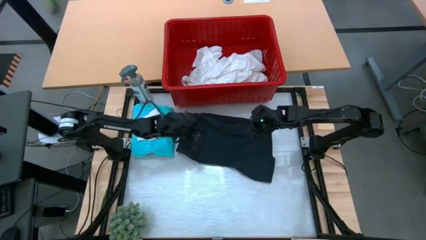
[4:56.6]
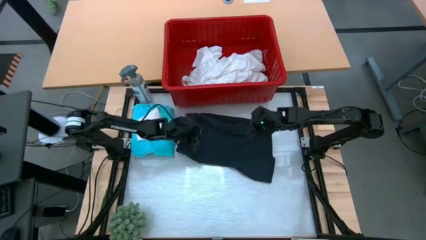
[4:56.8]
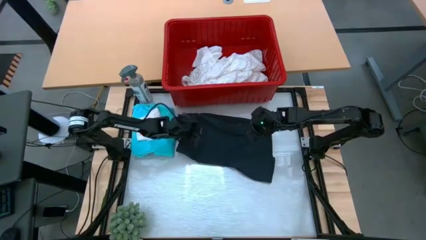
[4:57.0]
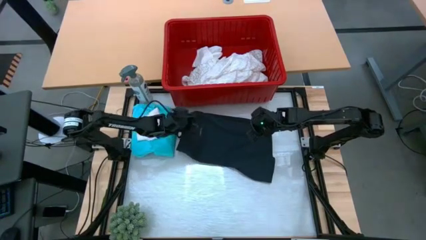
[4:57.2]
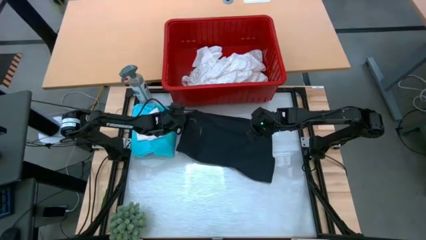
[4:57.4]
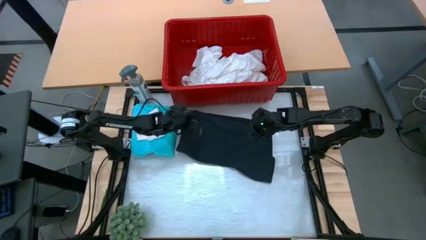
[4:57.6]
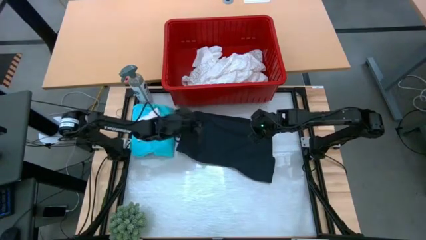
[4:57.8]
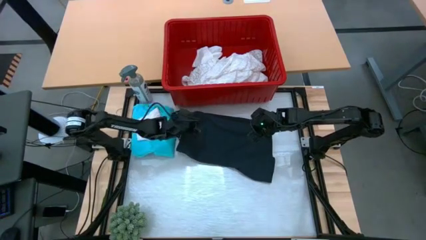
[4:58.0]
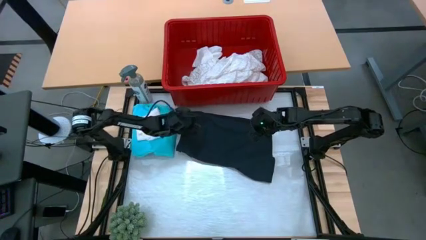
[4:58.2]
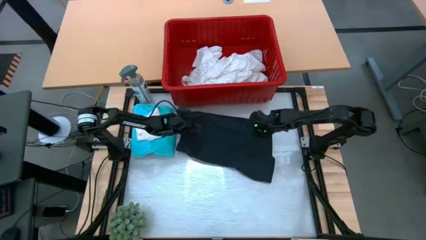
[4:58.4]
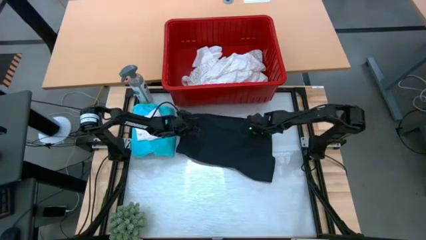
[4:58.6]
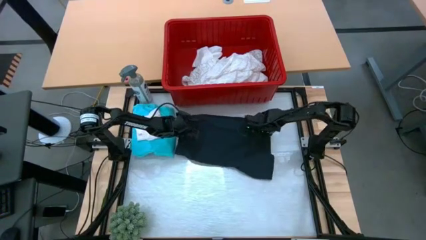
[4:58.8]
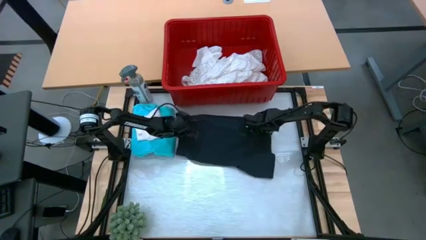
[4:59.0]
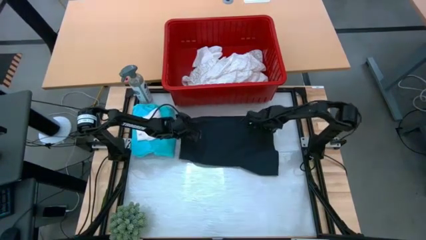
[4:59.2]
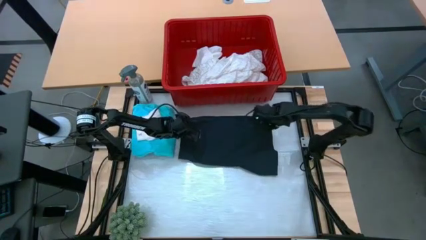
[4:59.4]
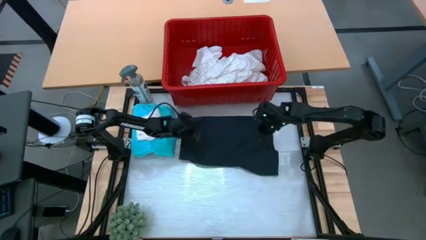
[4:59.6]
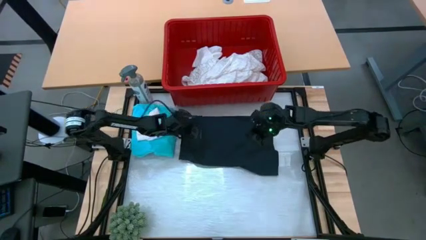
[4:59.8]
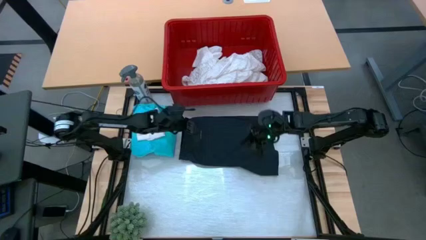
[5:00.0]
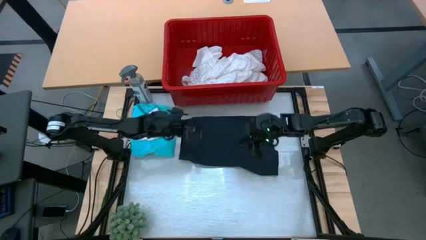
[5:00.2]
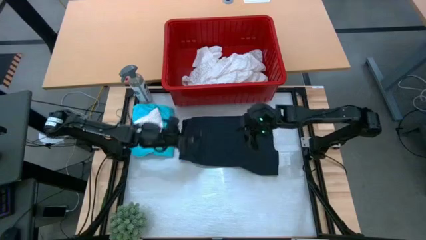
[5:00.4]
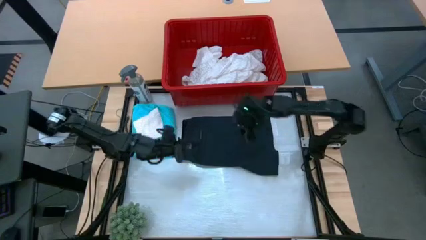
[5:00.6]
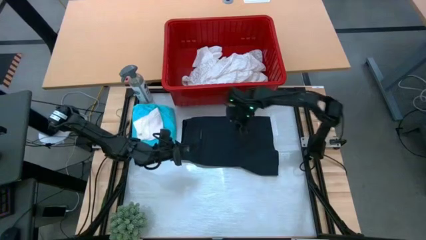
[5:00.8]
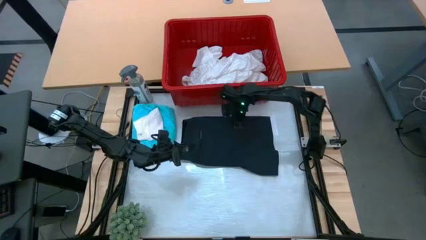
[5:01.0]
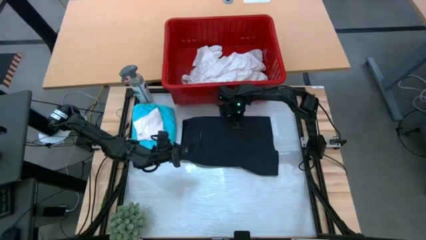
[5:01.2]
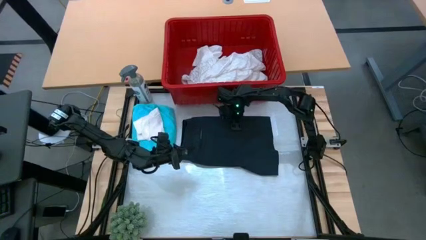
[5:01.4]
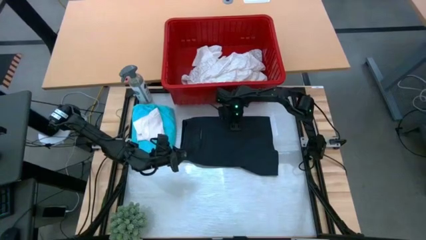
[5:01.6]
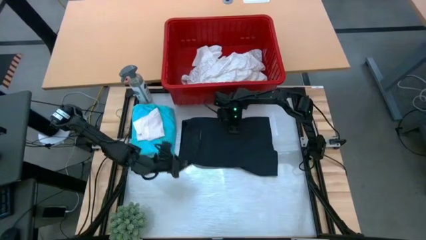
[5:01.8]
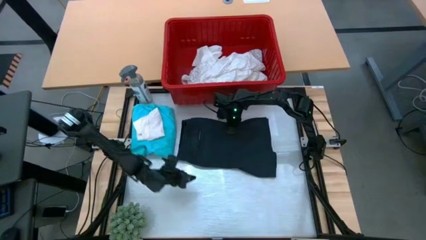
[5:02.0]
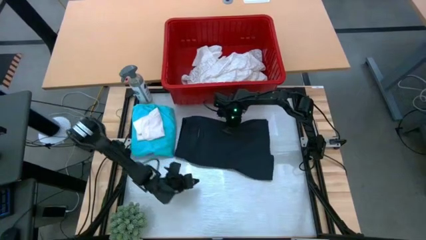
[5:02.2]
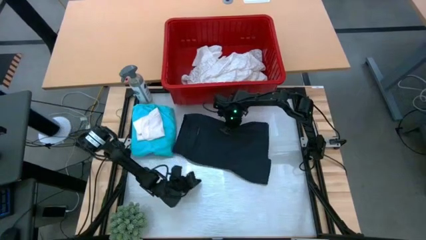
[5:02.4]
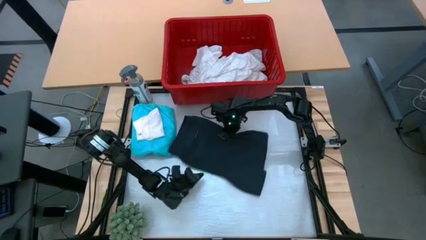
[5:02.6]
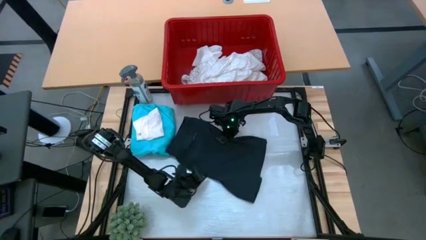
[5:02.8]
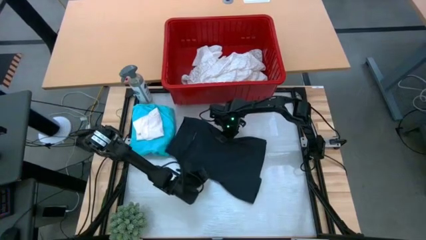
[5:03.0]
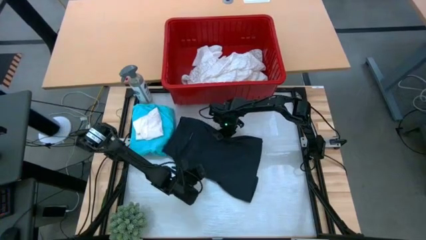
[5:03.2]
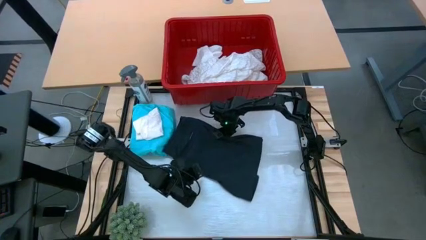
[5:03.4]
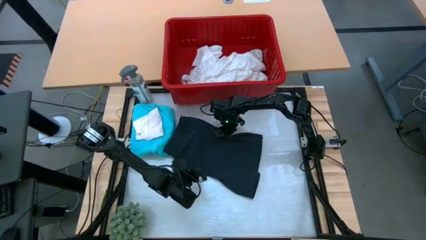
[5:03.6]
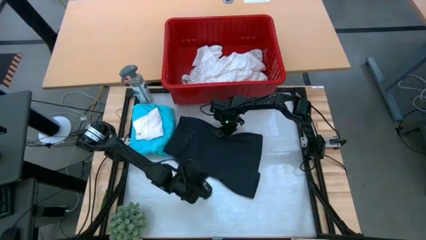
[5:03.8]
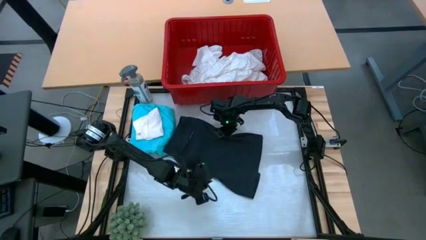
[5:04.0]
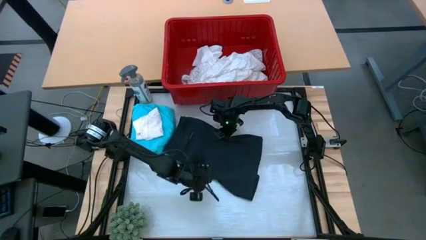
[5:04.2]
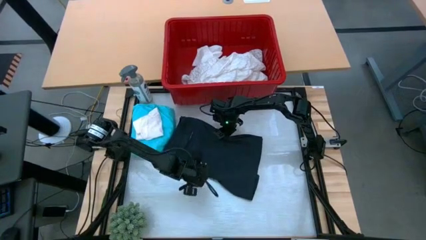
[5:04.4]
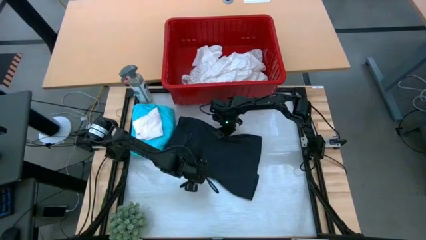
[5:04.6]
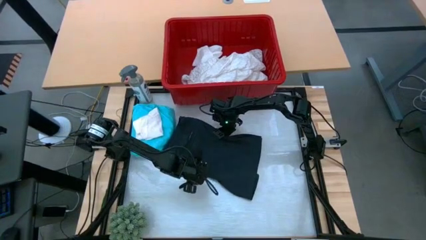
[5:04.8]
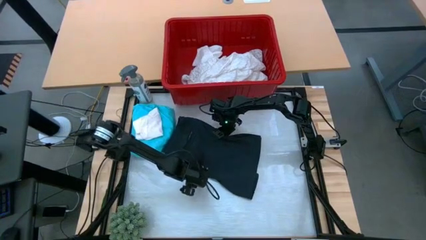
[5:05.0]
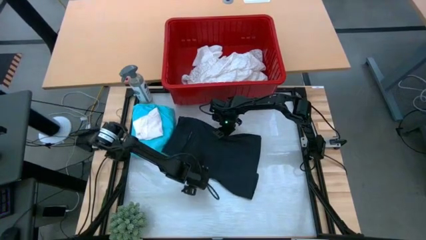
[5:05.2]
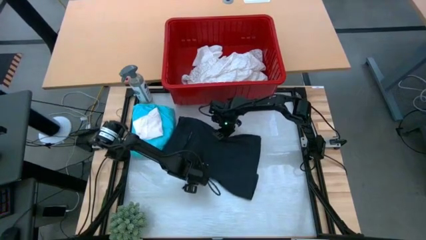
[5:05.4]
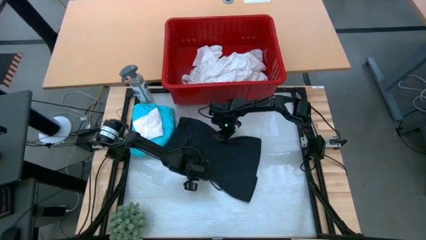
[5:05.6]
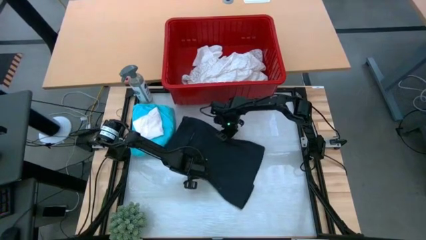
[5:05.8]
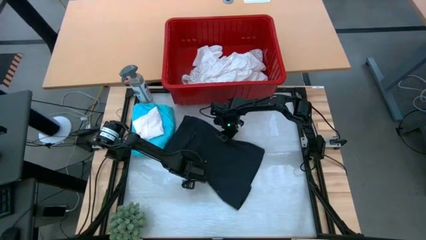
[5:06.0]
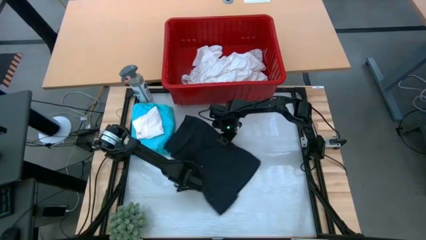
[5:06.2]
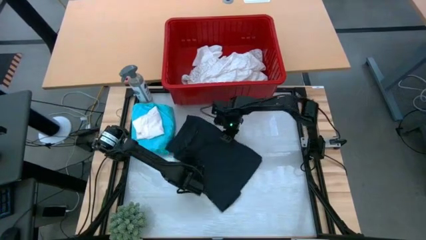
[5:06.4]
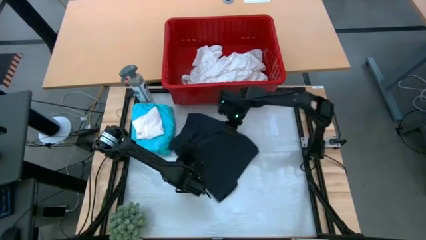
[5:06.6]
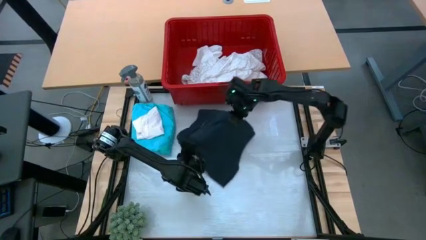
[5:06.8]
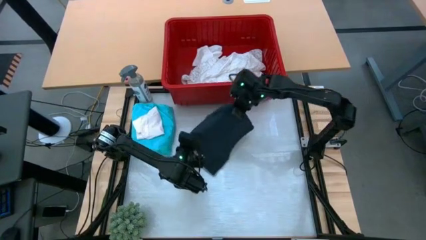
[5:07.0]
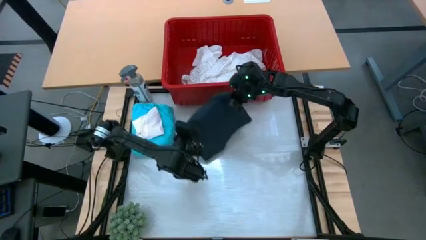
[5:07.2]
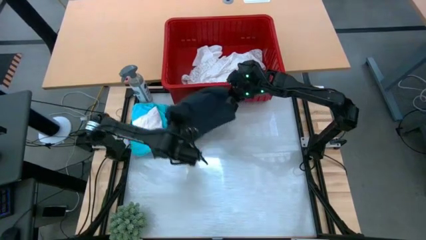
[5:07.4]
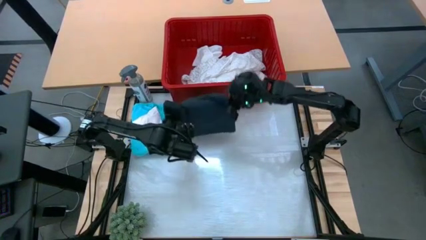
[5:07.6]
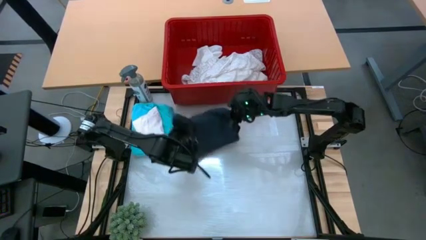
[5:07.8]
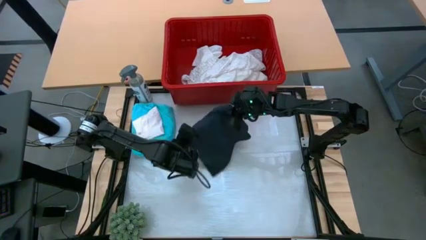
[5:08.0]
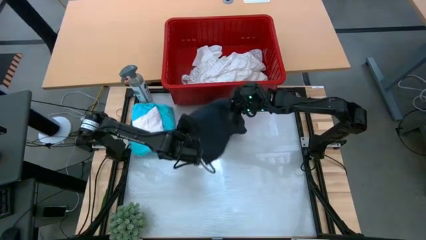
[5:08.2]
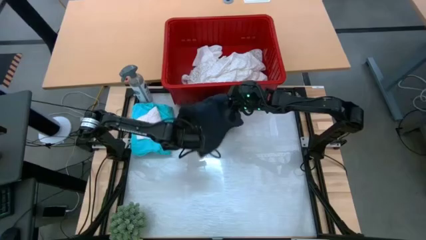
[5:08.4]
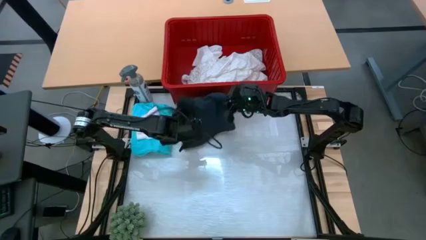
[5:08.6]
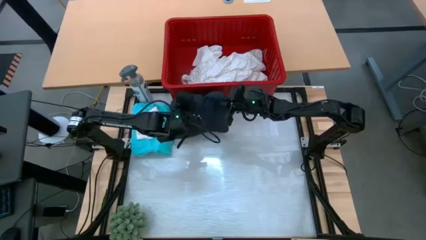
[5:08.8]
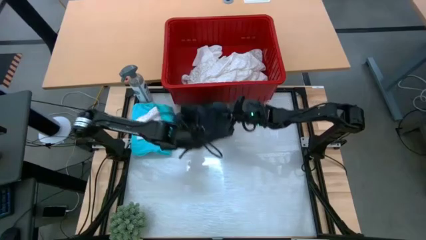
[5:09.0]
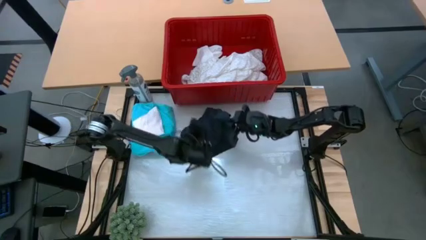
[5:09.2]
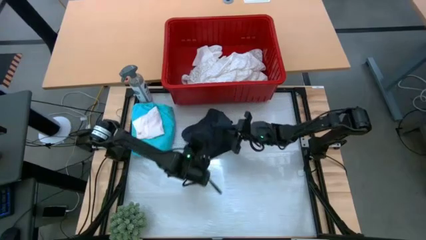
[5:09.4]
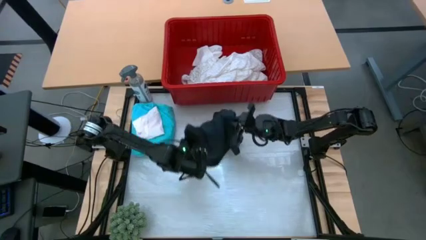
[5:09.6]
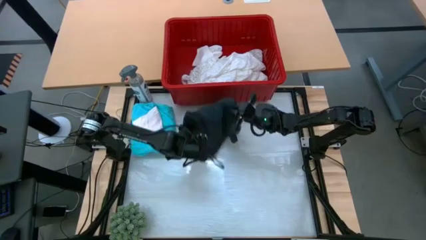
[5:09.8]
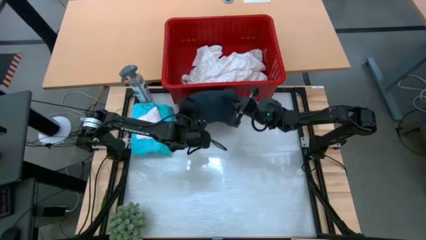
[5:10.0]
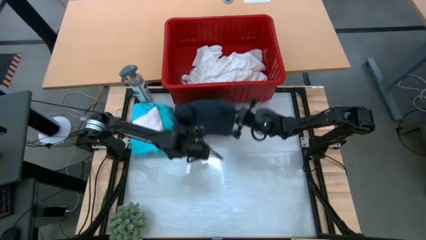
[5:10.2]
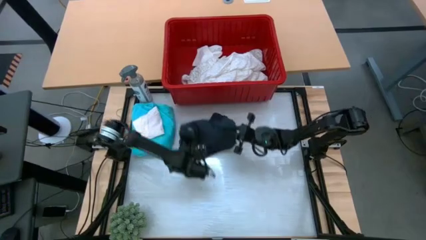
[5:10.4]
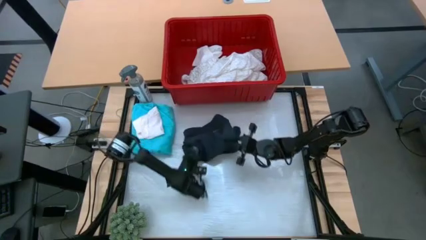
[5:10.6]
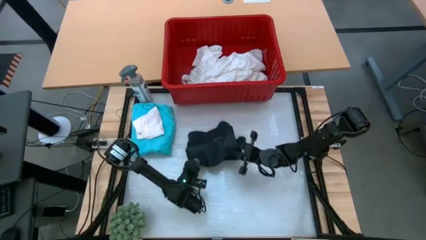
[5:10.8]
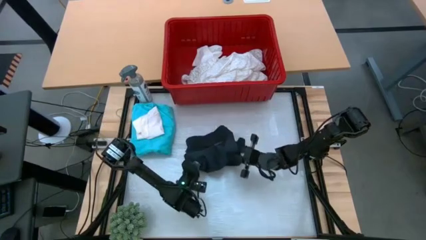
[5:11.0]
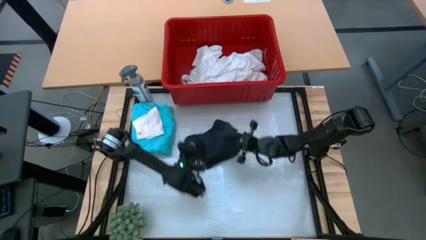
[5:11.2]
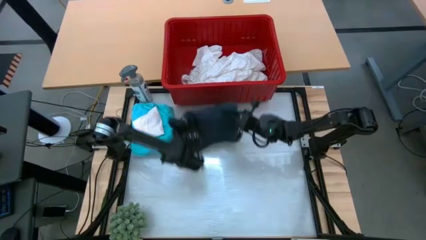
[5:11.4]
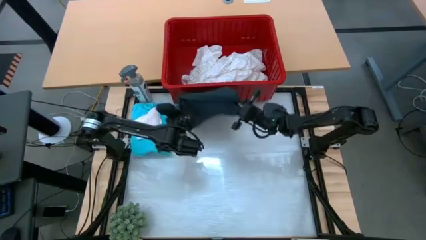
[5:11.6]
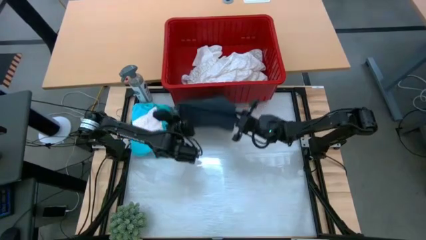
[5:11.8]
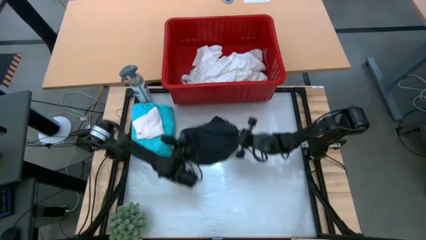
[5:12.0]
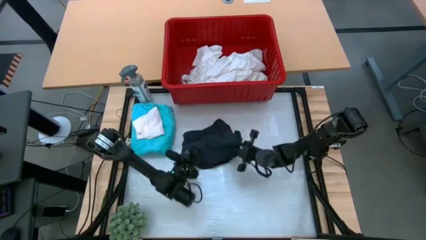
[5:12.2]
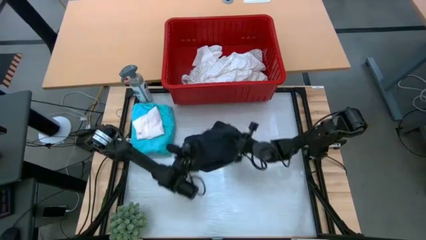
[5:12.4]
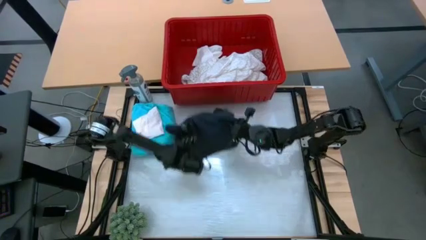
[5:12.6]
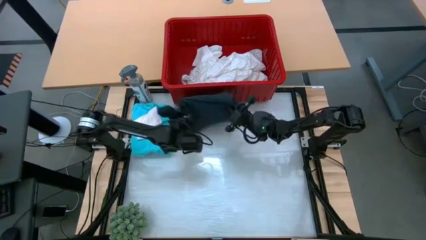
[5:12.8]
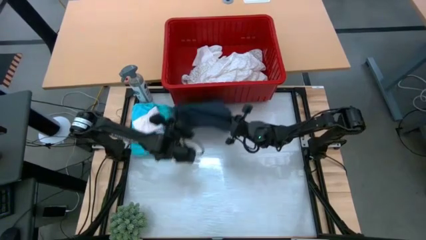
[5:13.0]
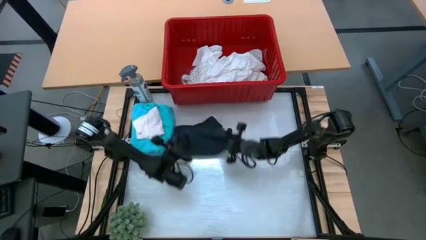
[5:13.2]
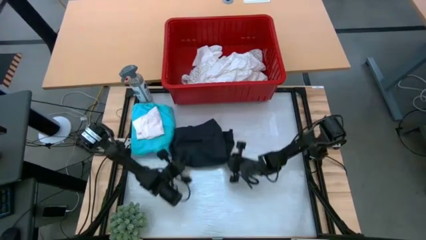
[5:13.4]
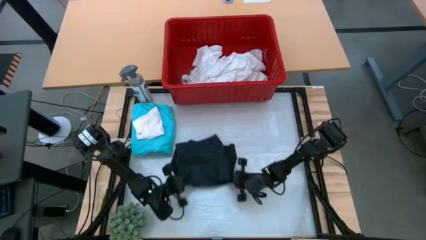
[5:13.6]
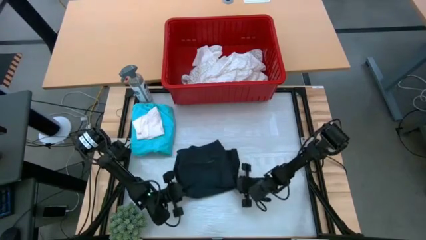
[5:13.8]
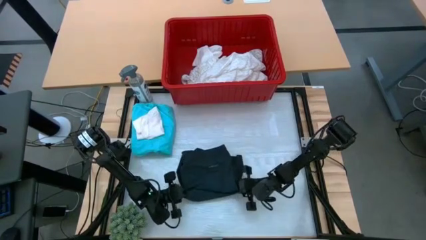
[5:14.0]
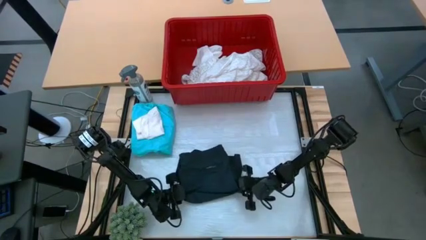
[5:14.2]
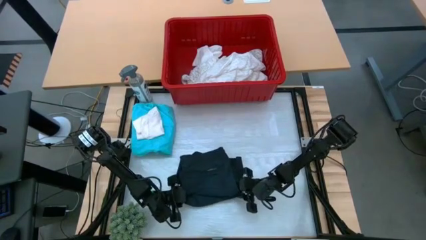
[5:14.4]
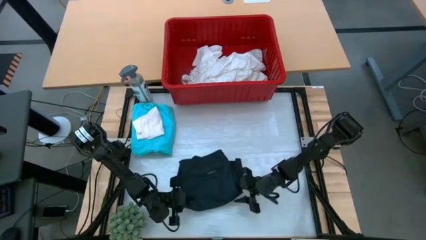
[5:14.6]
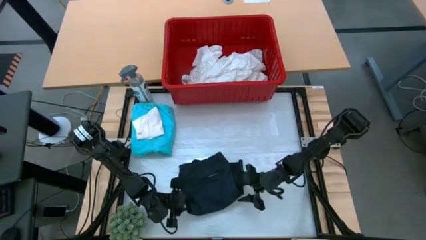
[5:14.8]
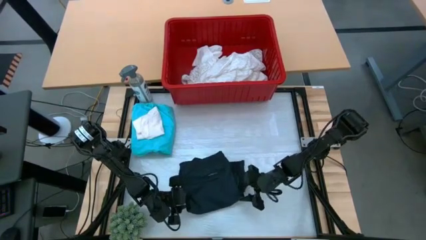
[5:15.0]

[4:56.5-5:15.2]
Task: Fold laundry
Fold the black shorts
